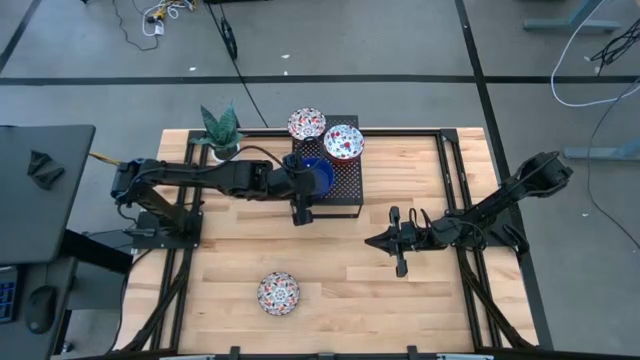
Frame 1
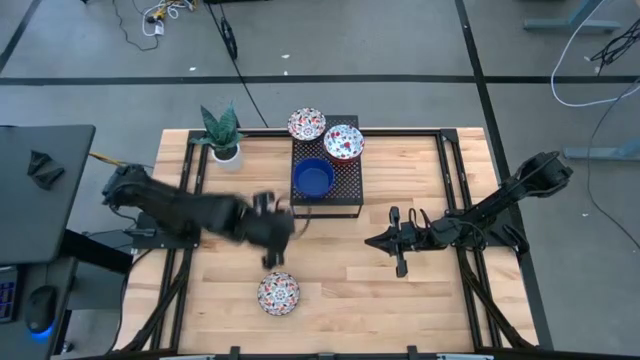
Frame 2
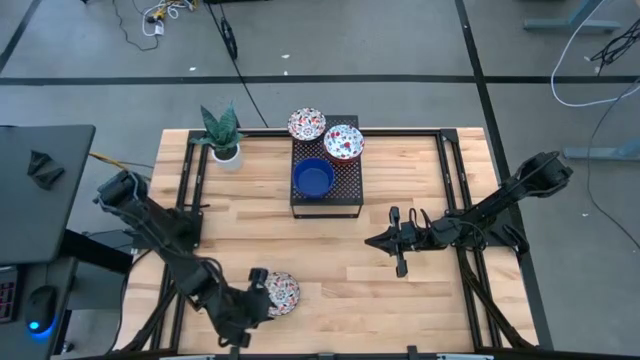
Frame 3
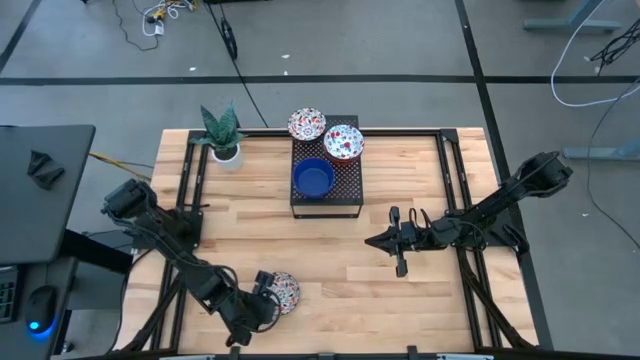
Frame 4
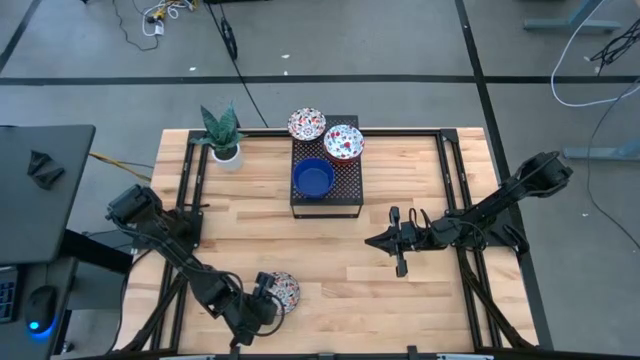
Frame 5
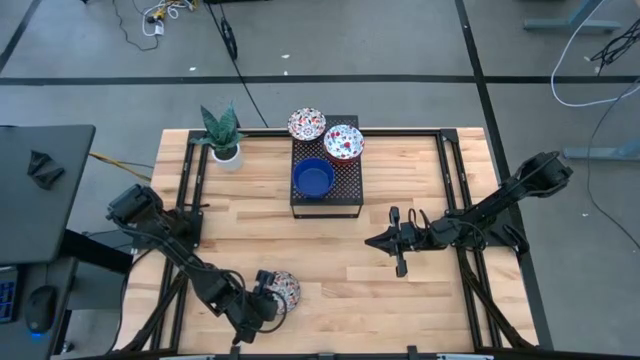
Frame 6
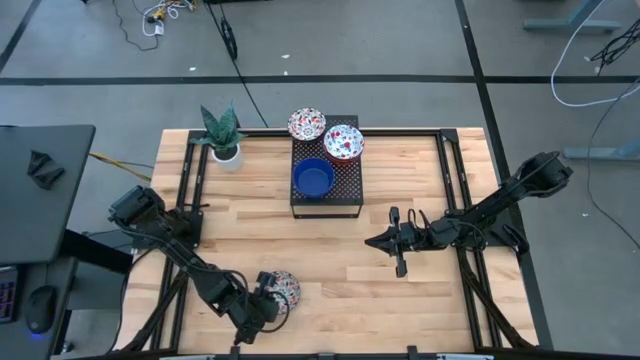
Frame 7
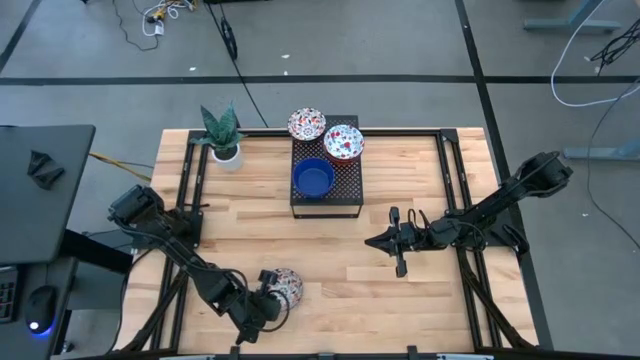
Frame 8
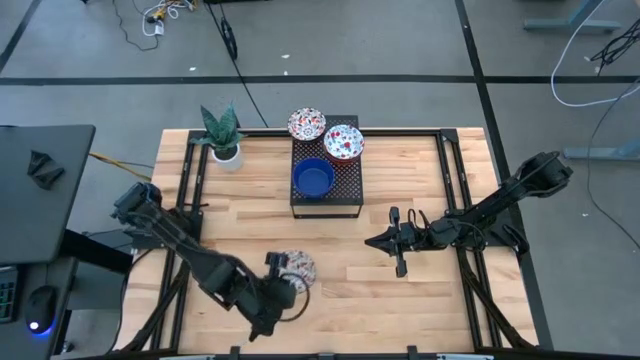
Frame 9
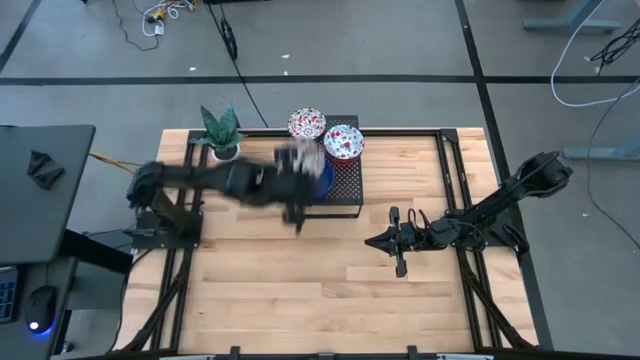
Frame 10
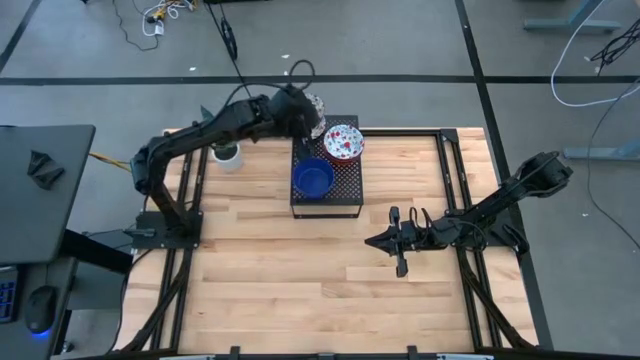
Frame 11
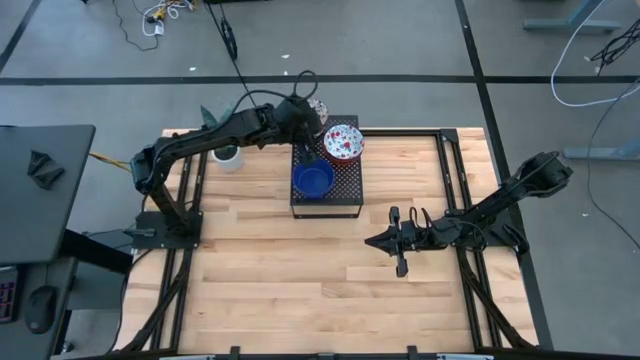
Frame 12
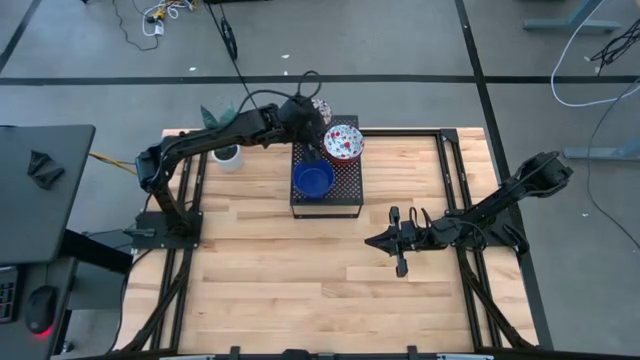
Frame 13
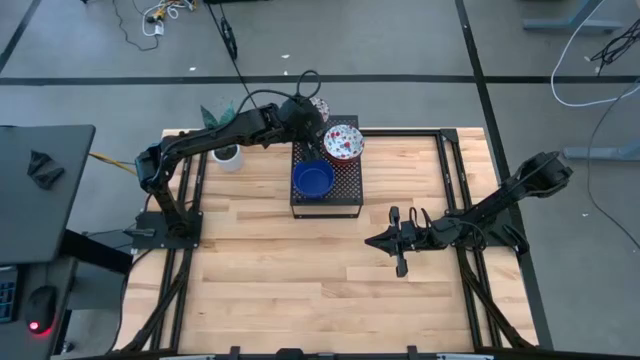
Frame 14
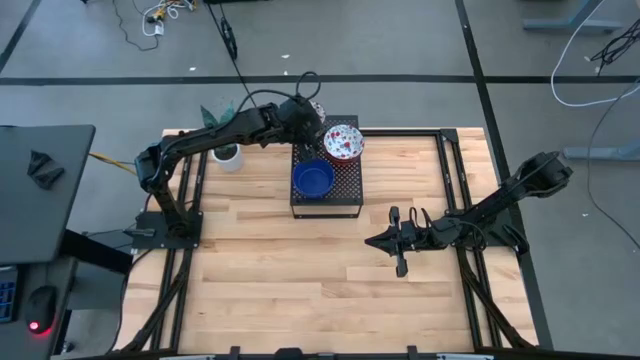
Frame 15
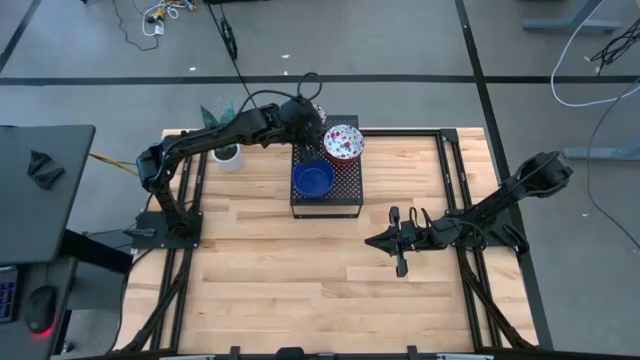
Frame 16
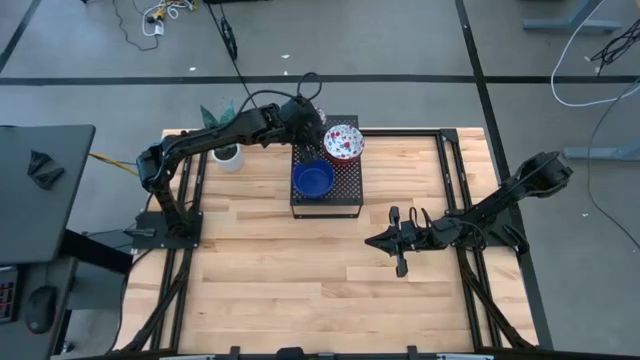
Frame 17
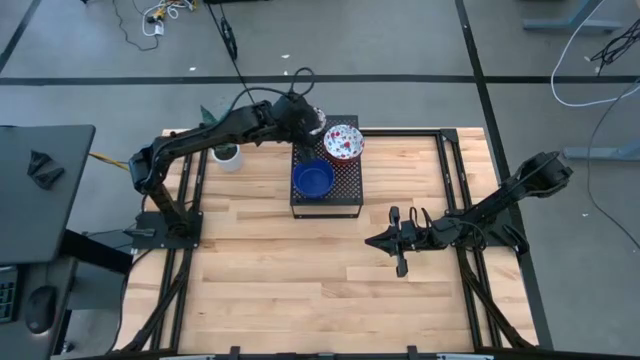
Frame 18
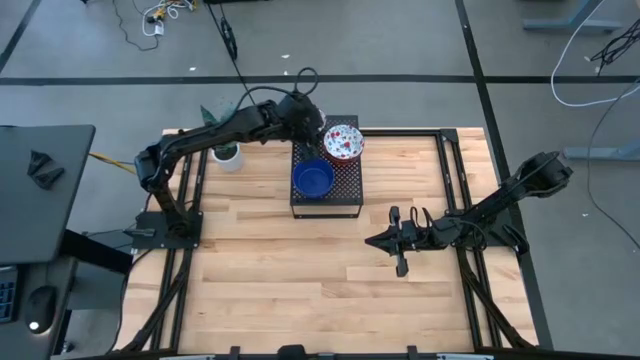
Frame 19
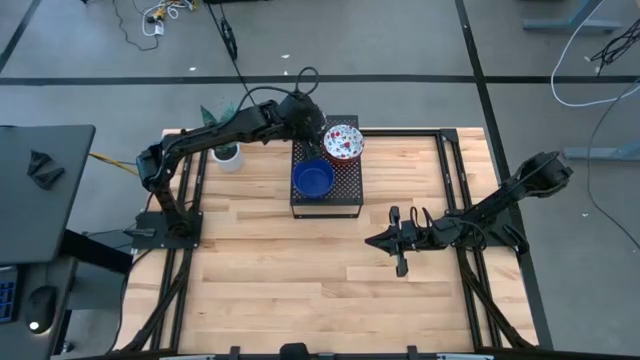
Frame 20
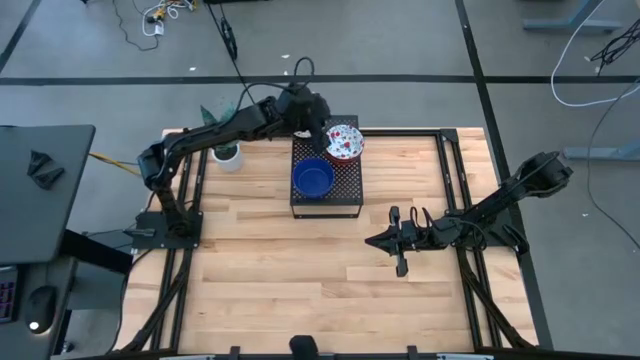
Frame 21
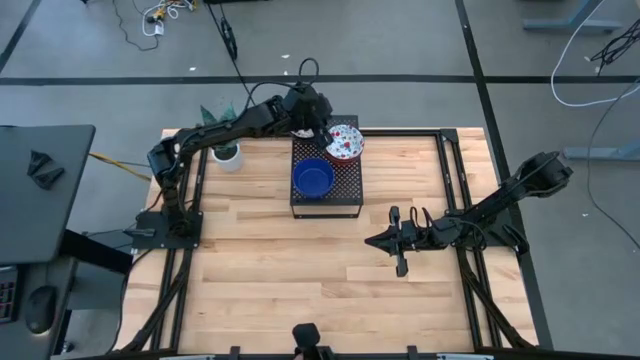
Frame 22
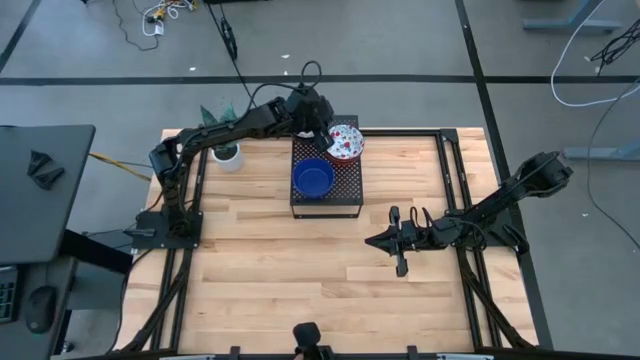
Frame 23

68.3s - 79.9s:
Task: Pick & Place Mini bowls
Stack the orange patterned bowl on top of the other orange patterned bowls on the shelf

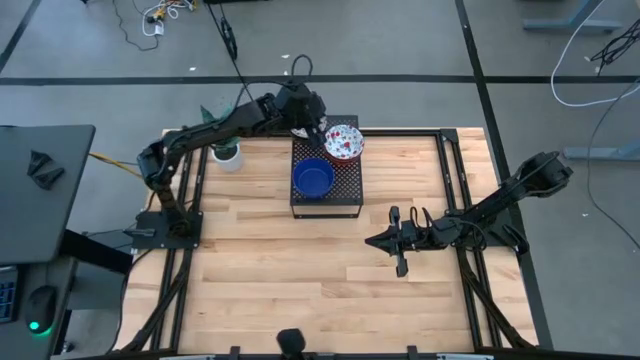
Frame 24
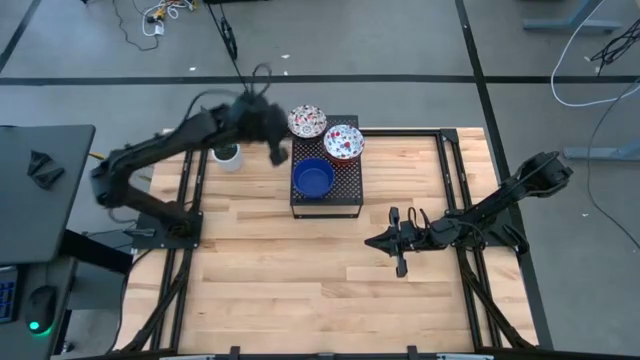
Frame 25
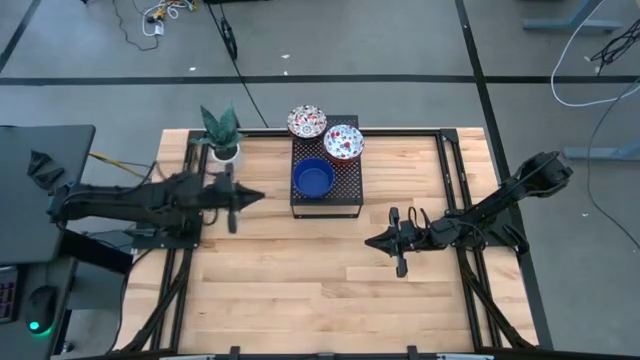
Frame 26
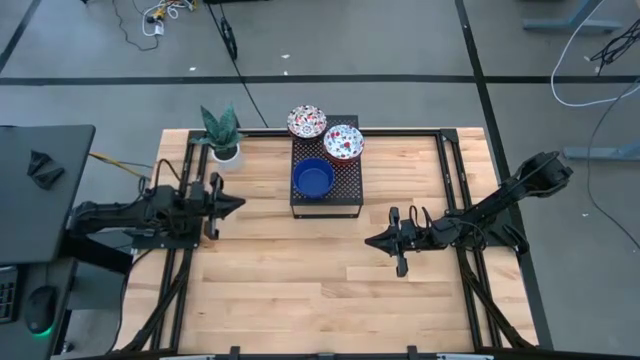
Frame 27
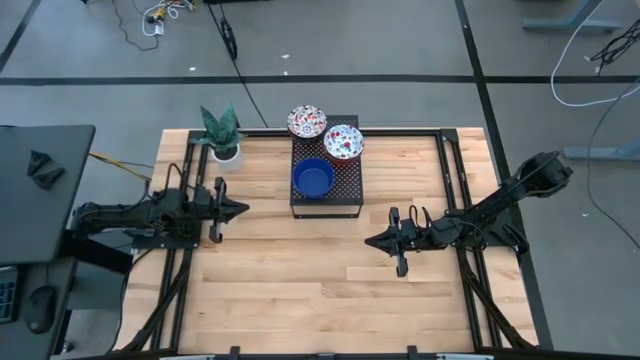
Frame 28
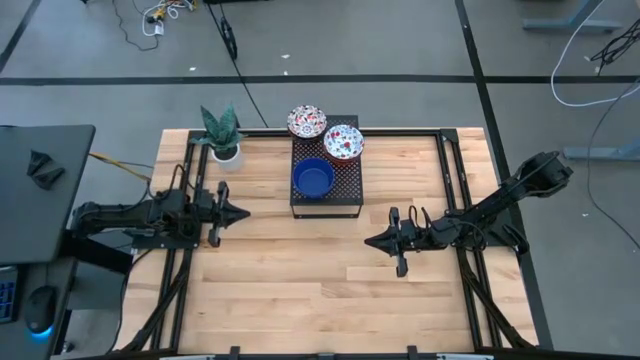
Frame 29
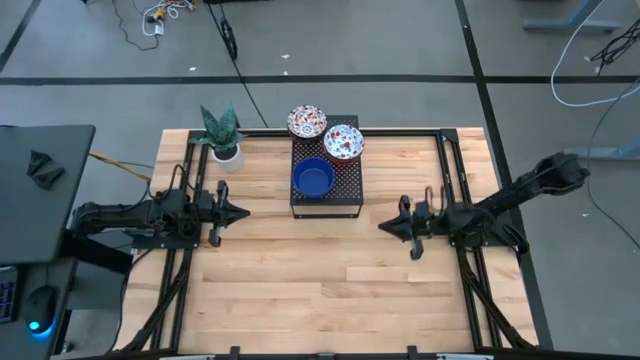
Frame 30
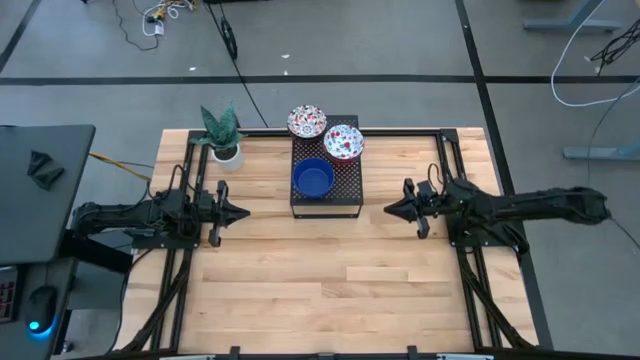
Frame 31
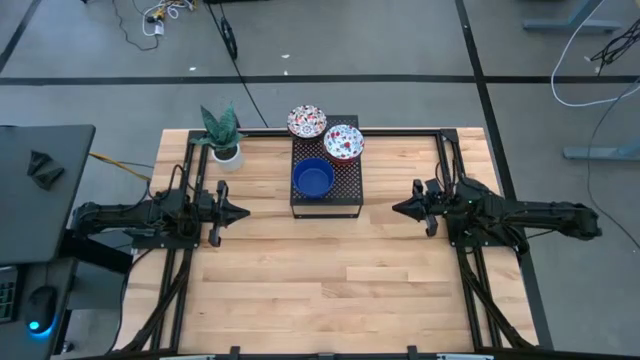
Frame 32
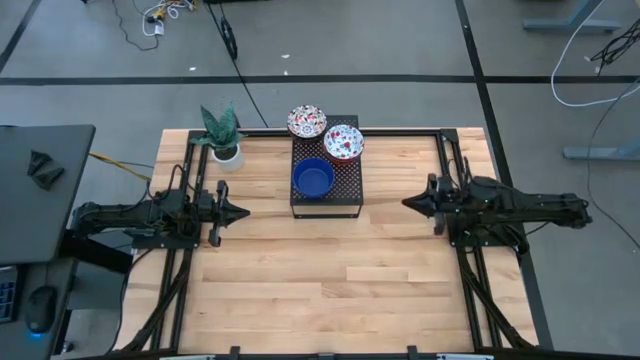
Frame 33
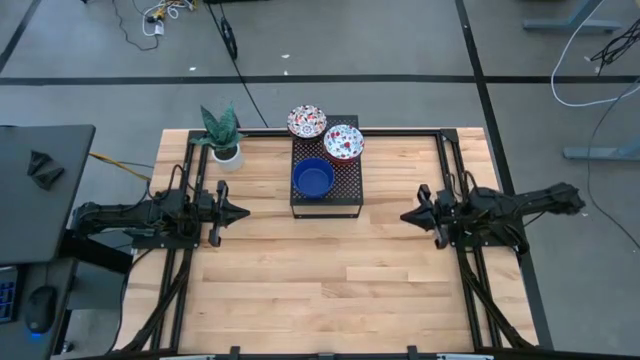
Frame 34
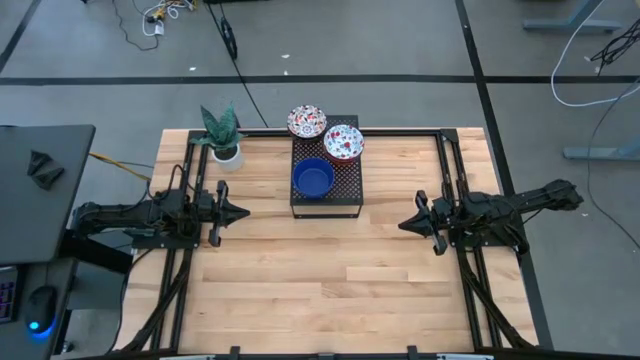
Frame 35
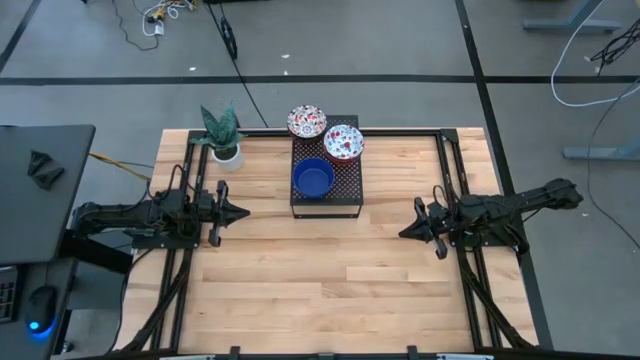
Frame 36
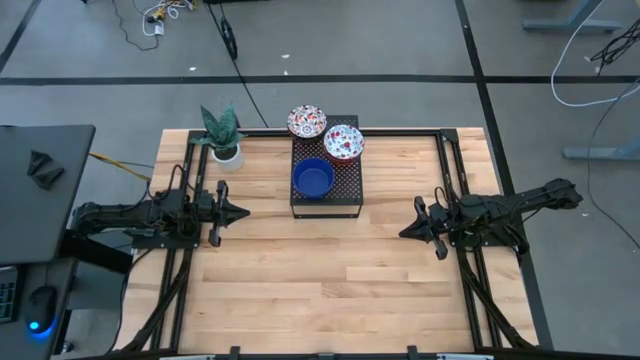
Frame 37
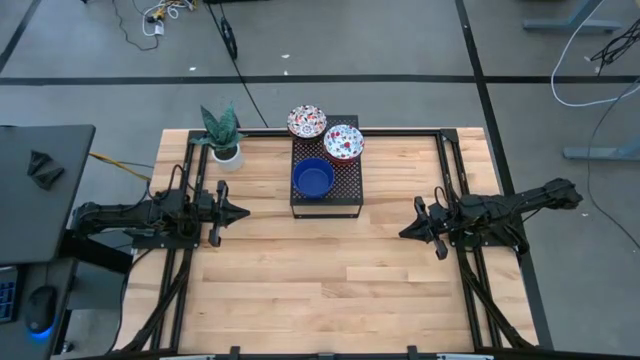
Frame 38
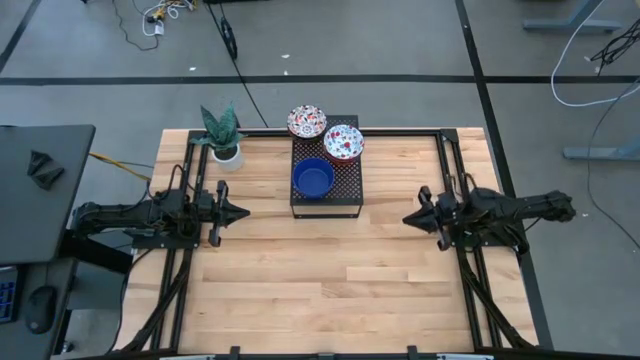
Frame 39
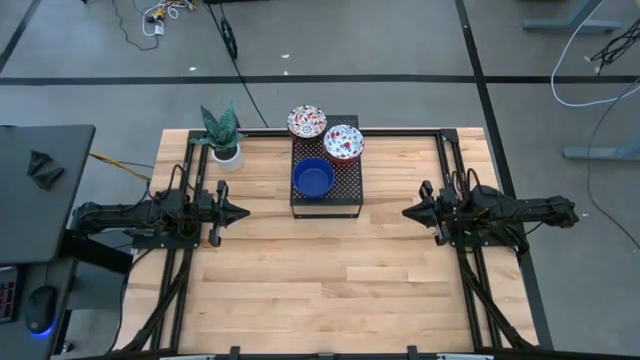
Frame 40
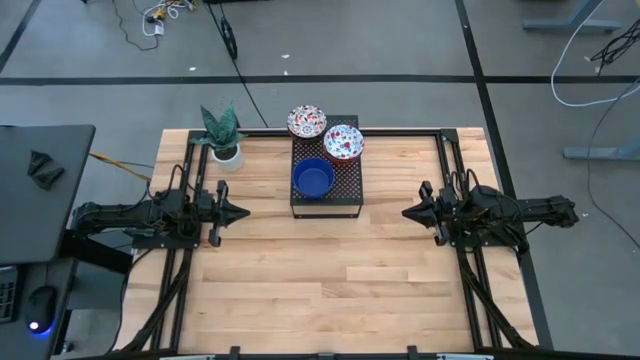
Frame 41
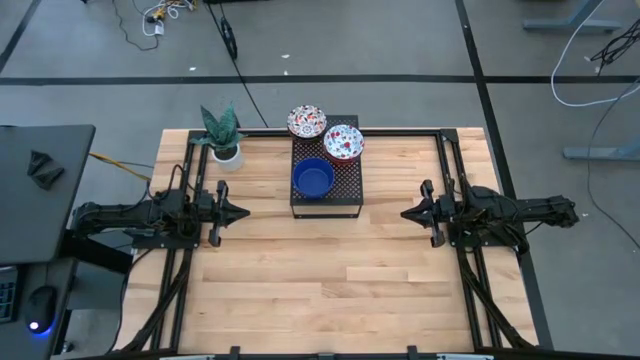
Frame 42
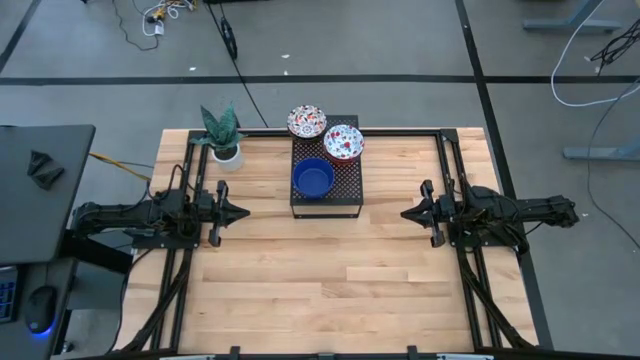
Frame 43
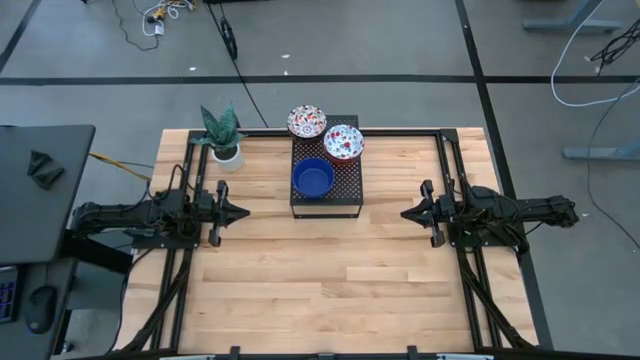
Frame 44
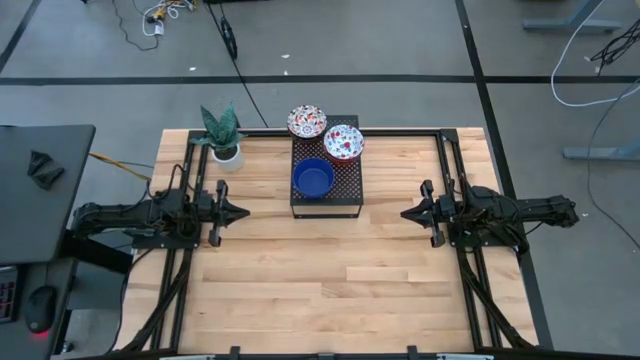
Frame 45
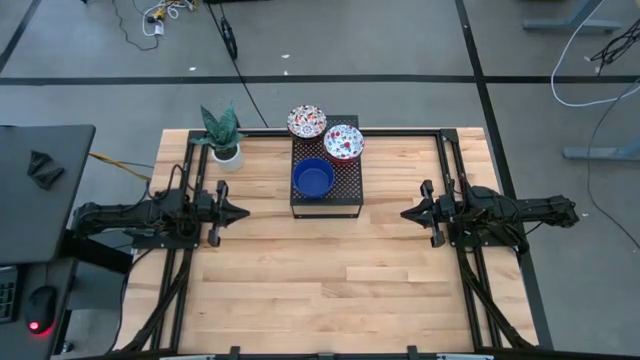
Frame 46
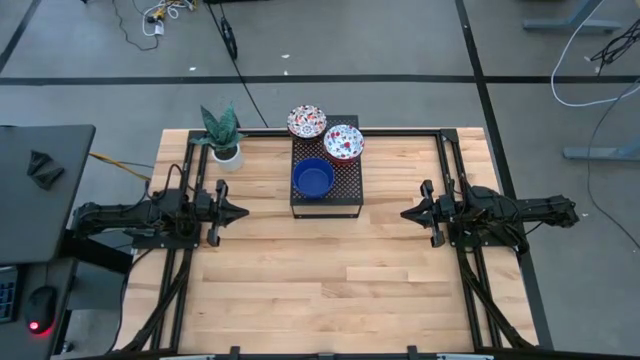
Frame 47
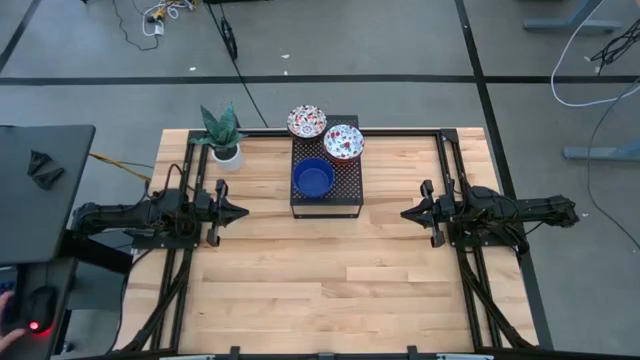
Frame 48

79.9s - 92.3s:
Return to Home Position
